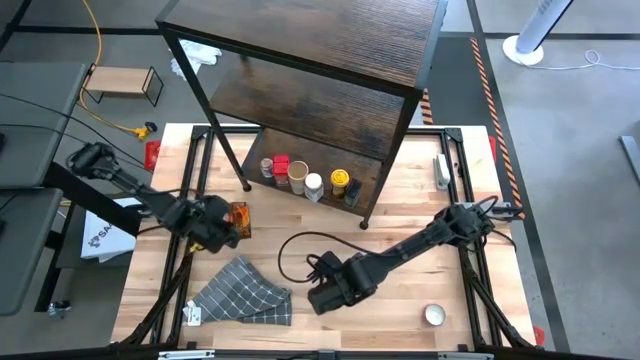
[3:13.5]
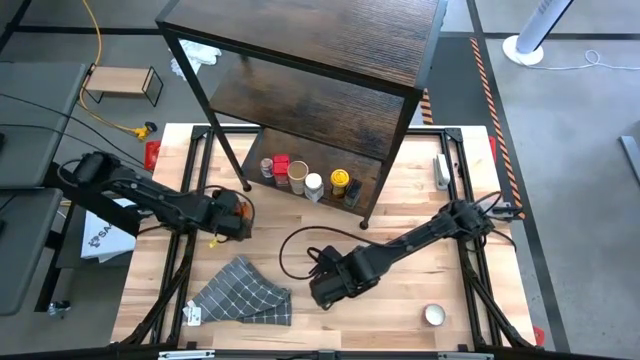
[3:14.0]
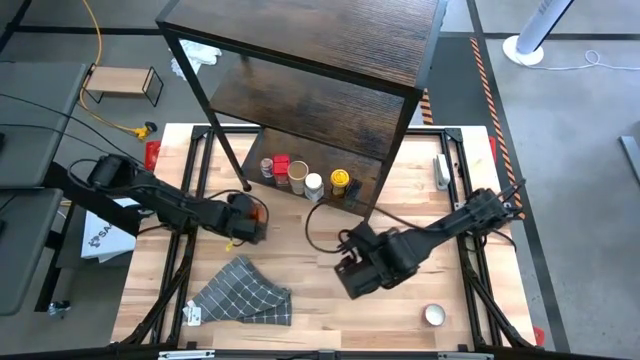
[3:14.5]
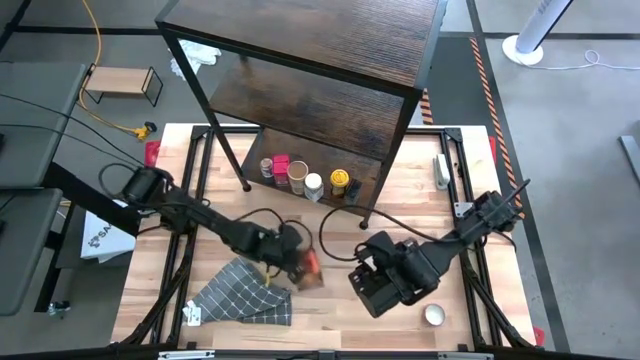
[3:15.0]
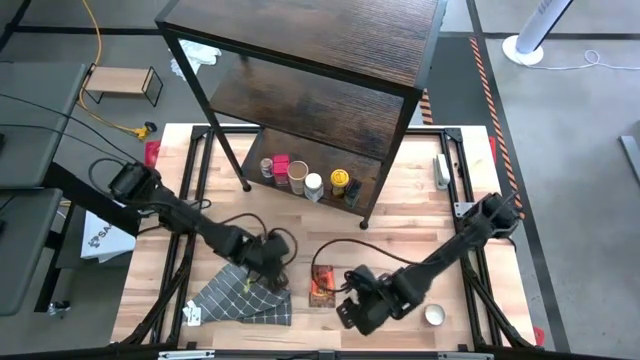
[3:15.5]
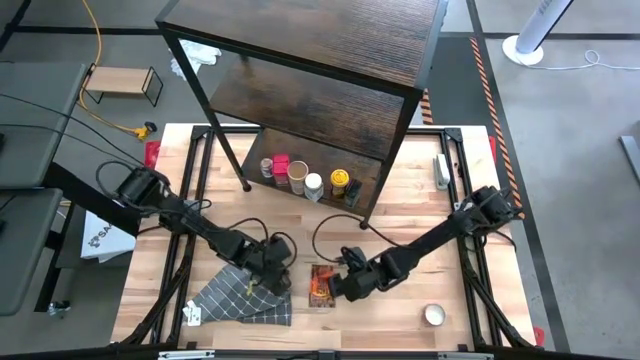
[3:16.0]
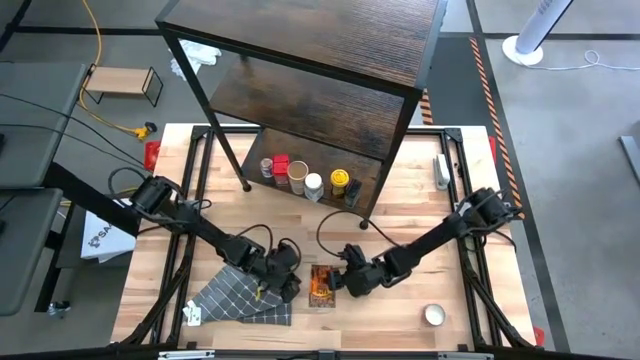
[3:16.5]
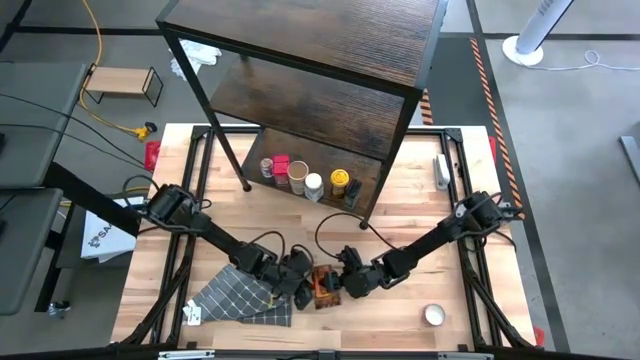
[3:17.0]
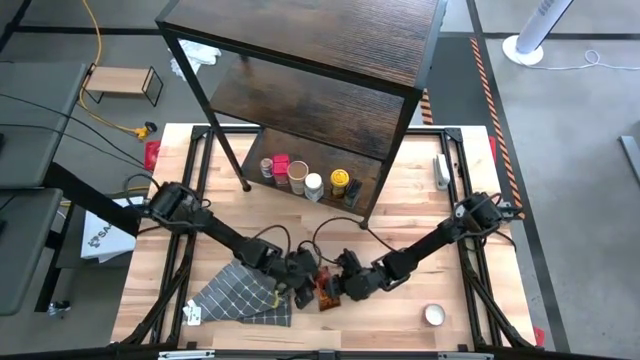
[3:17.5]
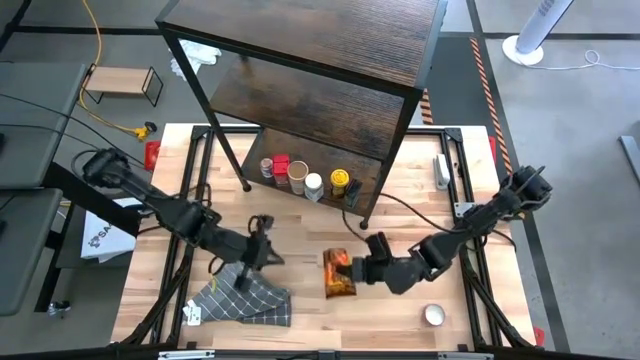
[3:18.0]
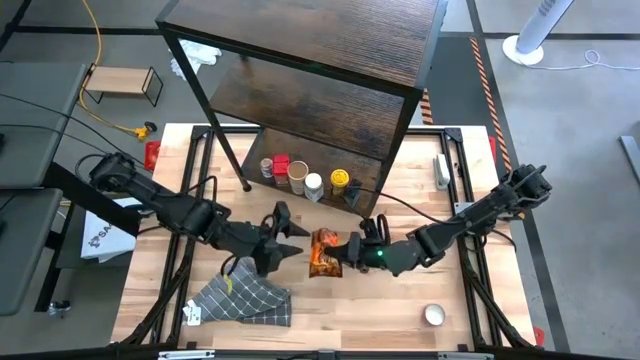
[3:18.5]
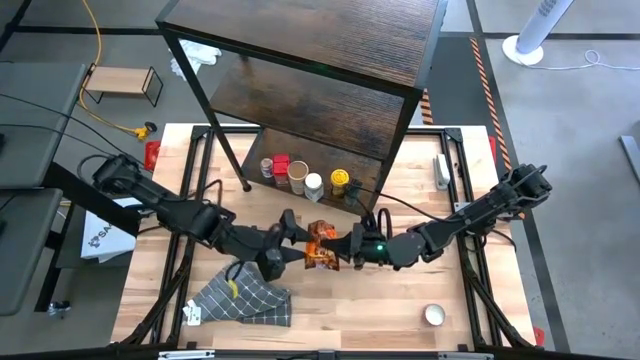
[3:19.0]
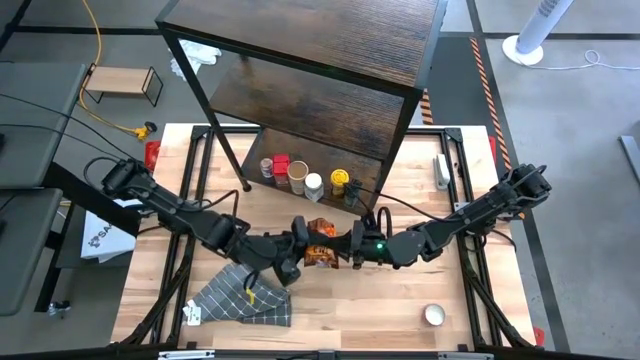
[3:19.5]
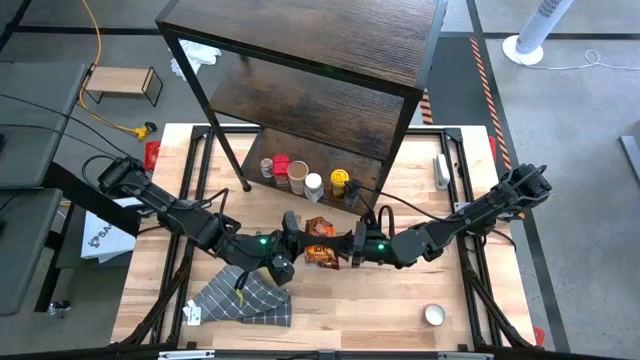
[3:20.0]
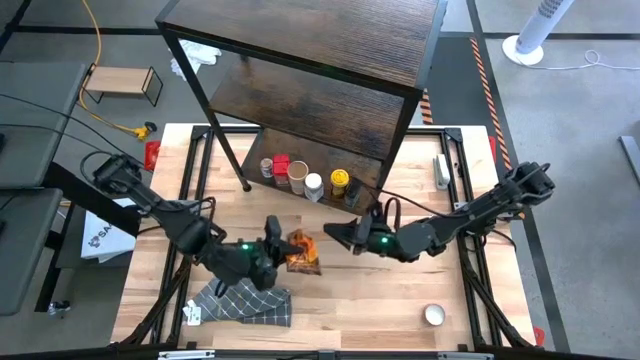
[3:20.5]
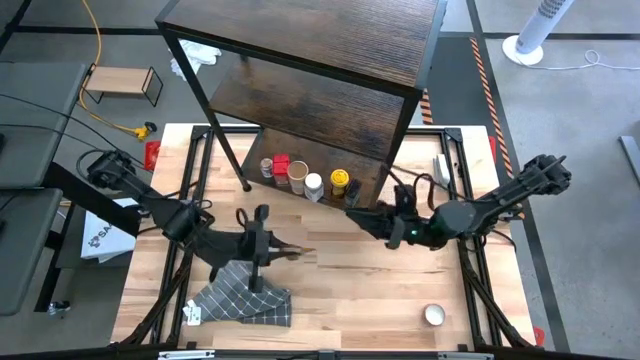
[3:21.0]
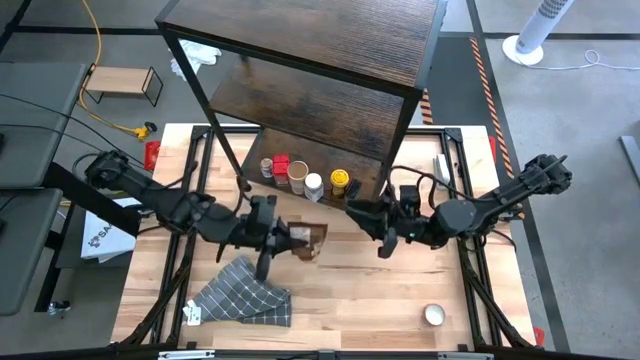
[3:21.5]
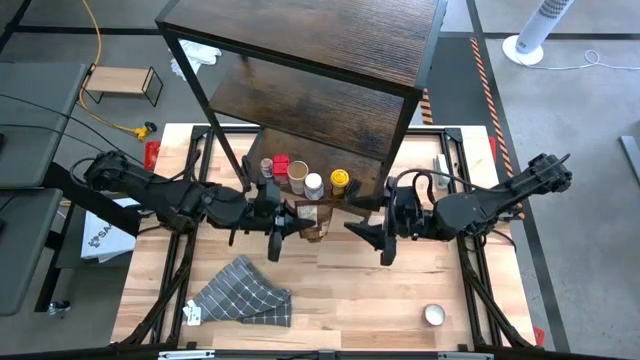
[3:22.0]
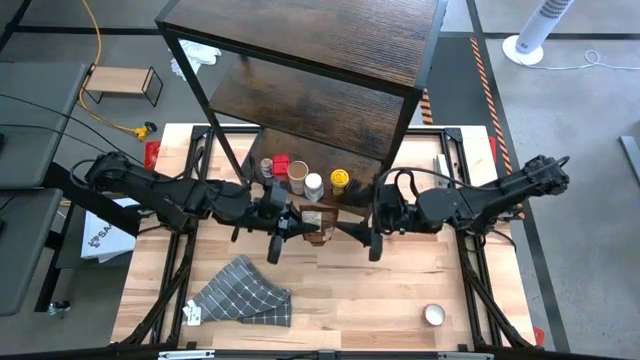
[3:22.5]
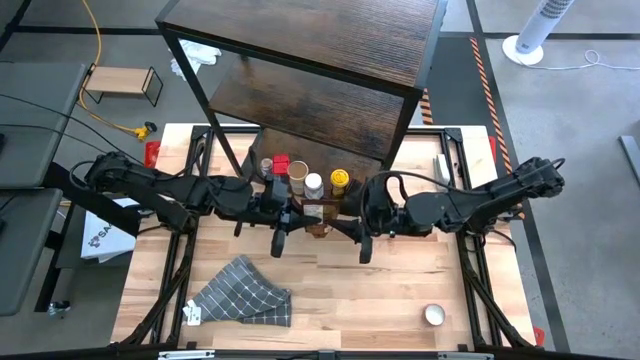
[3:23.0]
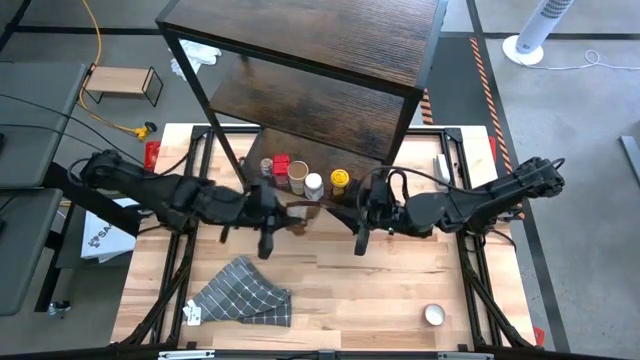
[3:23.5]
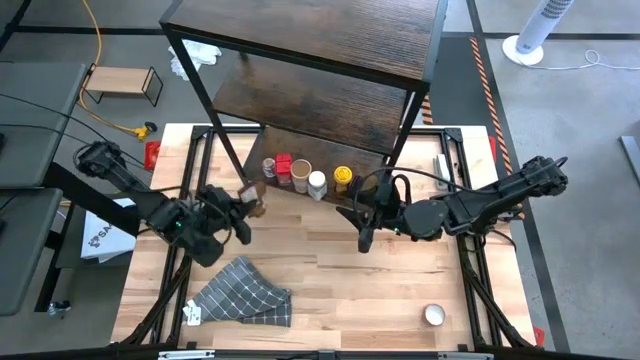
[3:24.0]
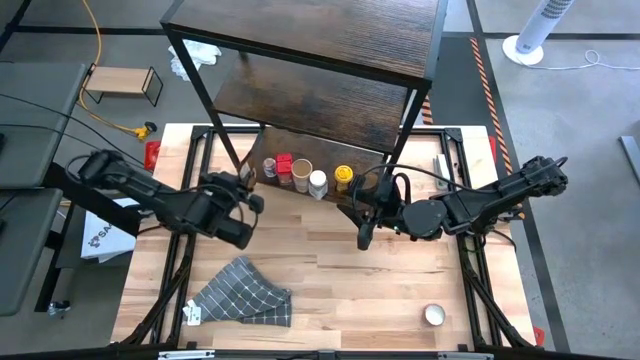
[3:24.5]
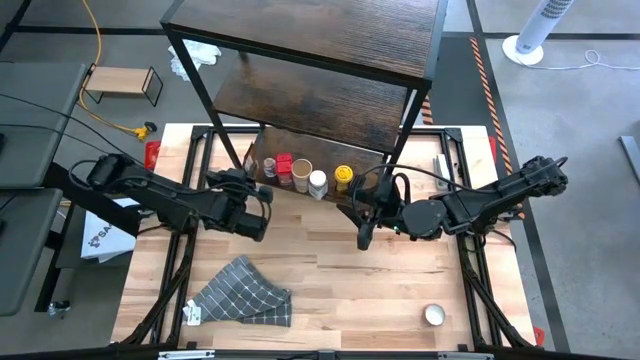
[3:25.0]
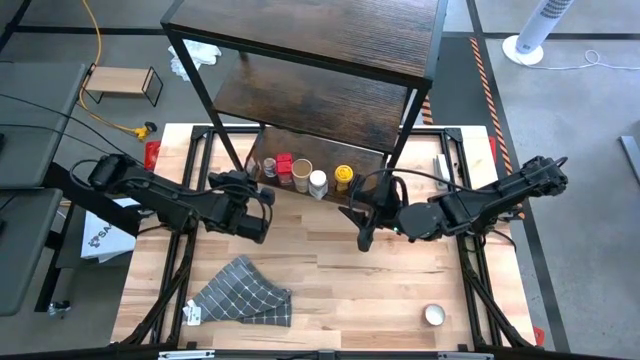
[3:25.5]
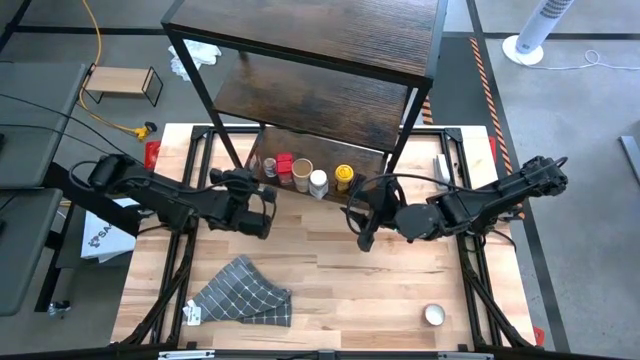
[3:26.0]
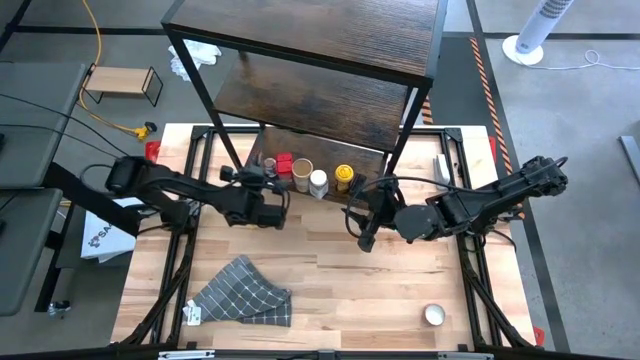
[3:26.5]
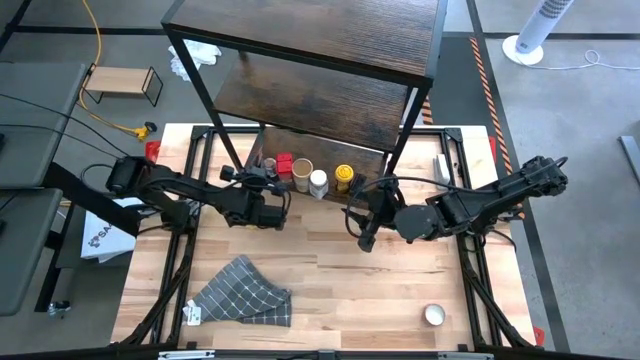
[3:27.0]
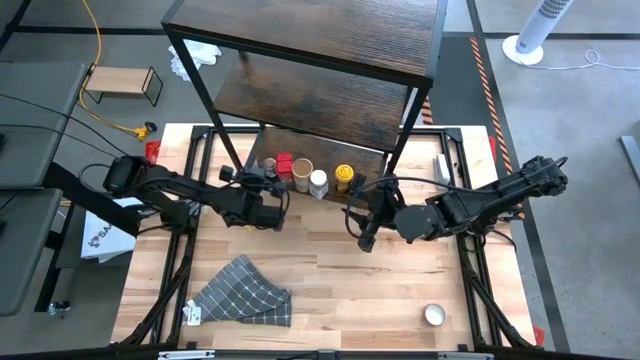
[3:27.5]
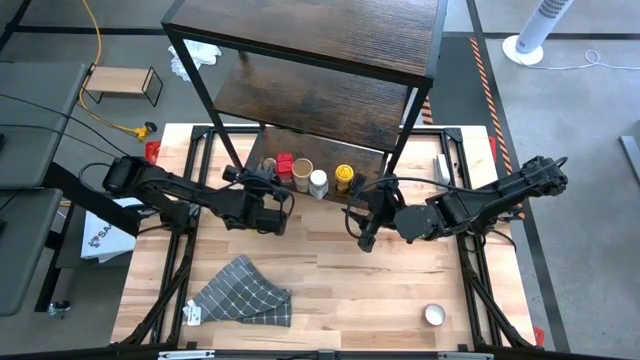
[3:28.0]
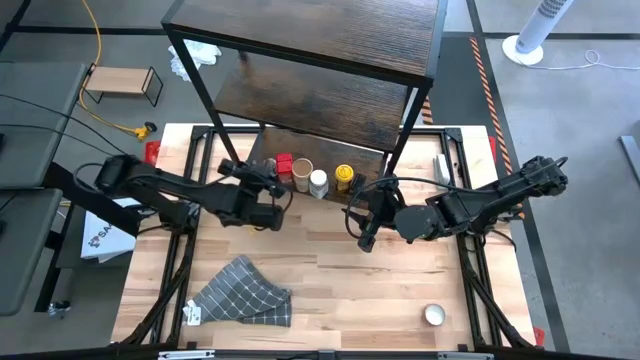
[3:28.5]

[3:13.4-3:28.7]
Task: Shelf spices
Put the orange seasoning pack on the shelf

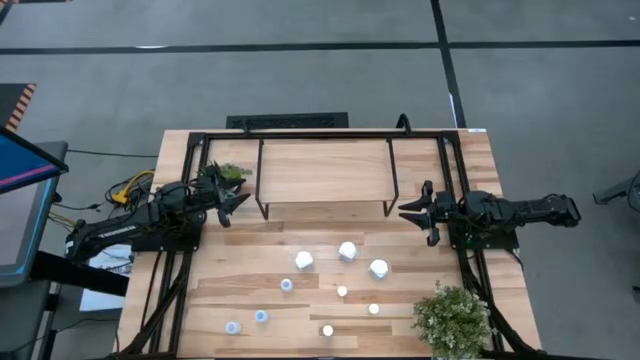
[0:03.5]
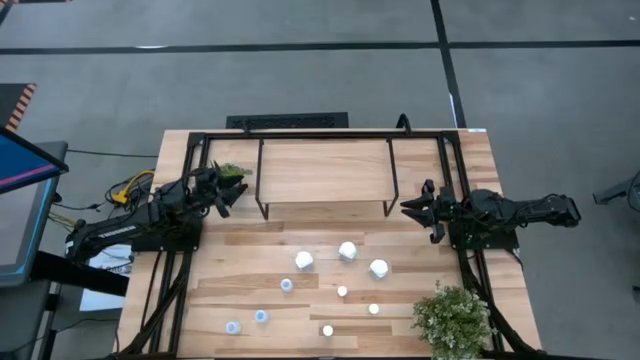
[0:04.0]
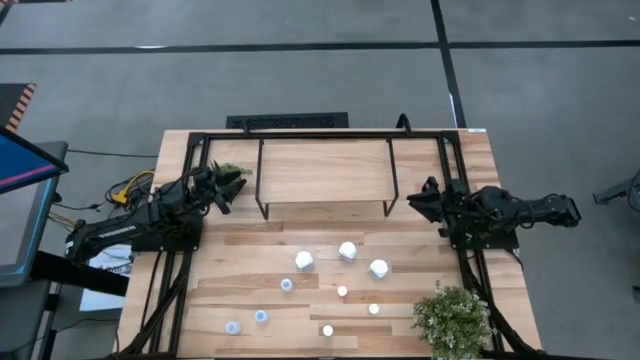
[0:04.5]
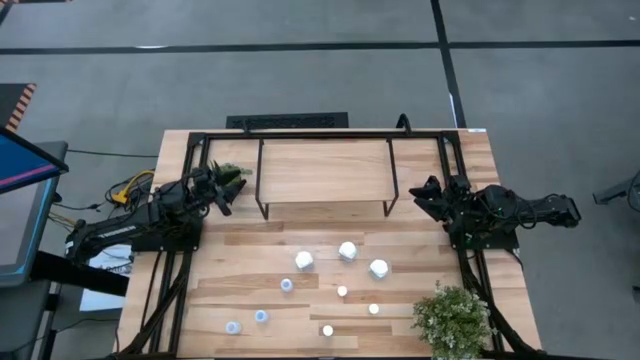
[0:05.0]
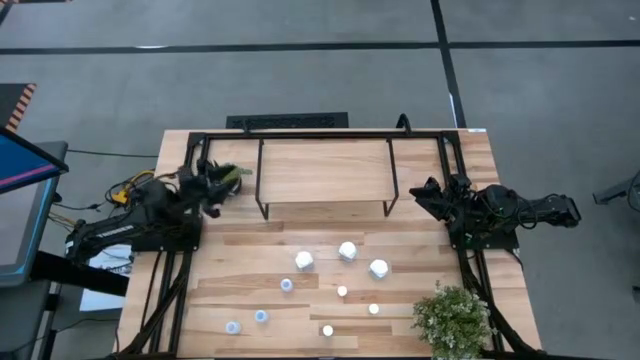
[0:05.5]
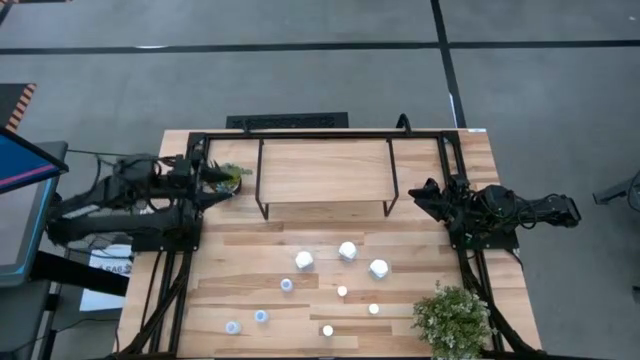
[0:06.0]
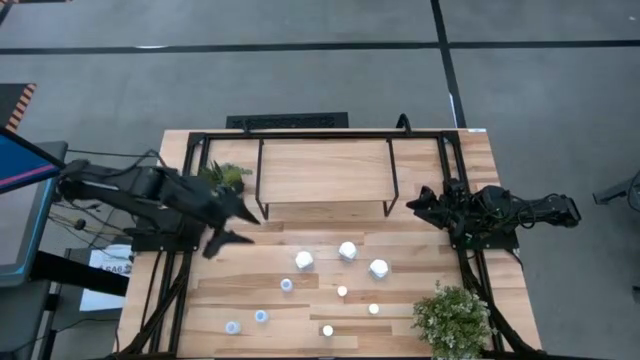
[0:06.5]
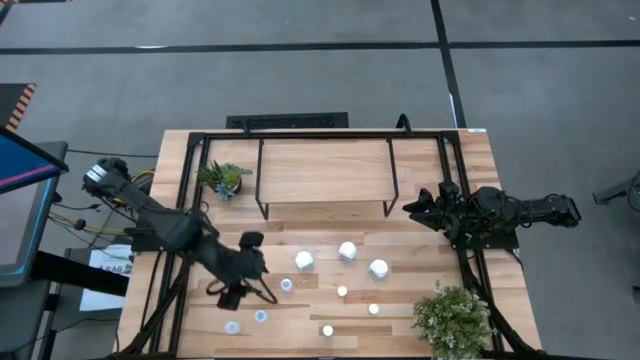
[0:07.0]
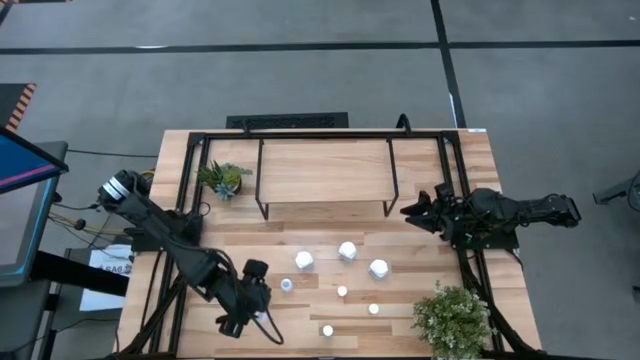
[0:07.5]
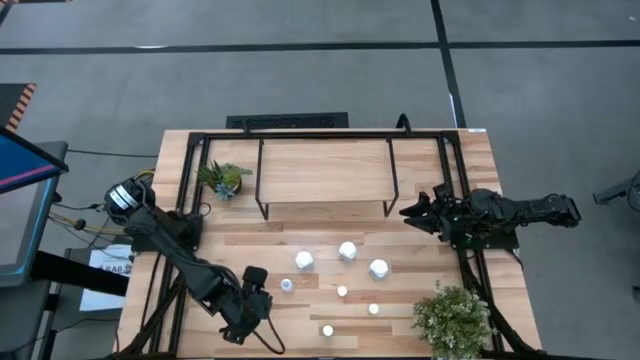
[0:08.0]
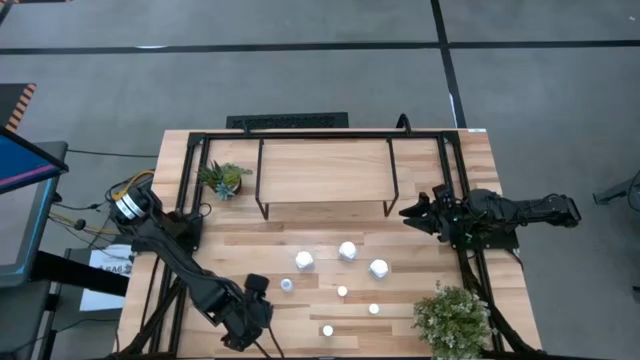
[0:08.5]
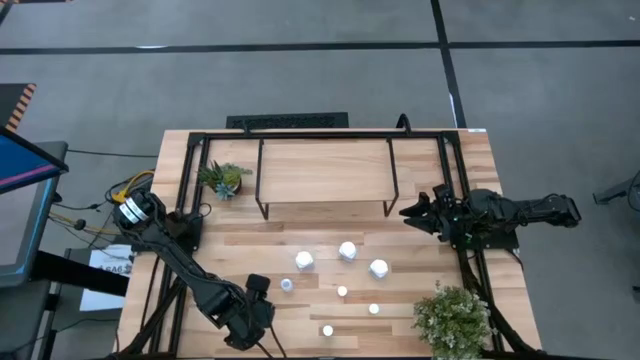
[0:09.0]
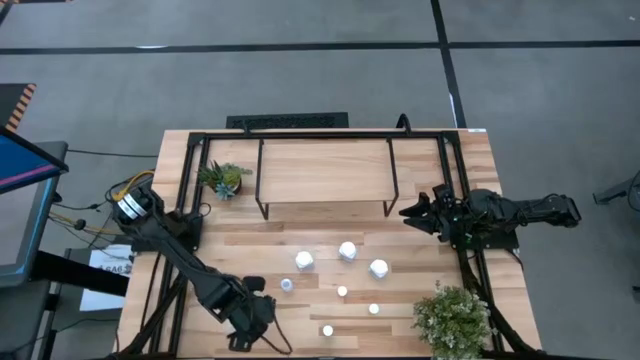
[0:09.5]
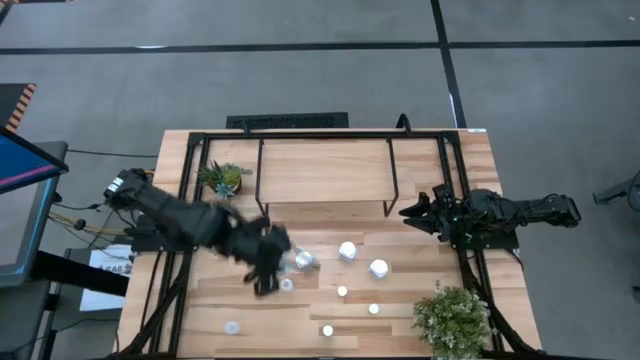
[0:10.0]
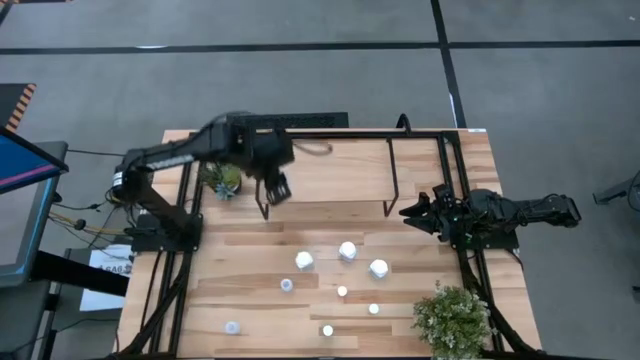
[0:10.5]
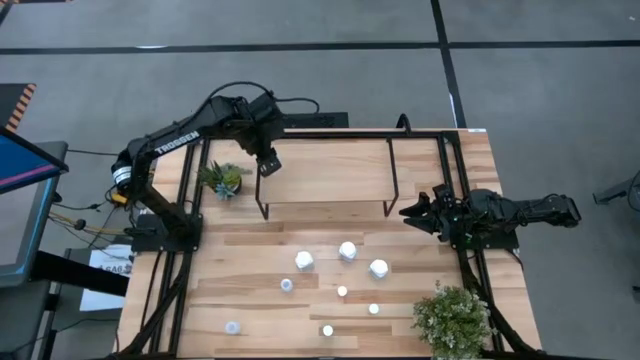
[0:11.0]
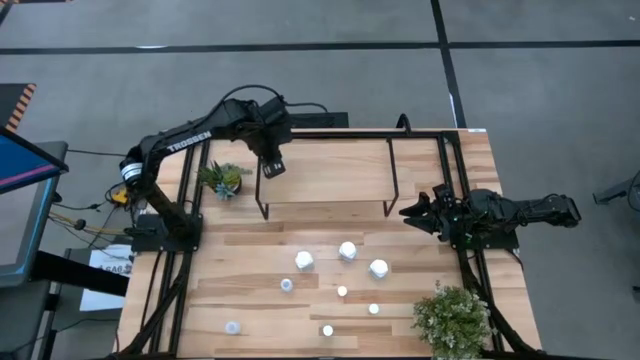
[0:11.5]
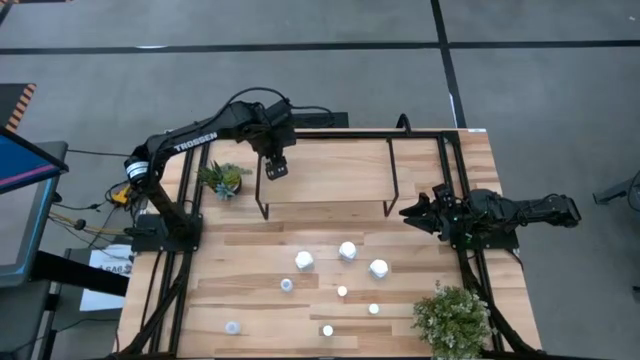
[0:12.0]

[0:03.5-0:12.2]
Task: Pick and place medicine bottles onto shelf by color
Put the middle transparent pill bottle on the shelf
